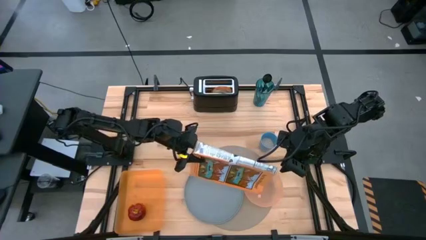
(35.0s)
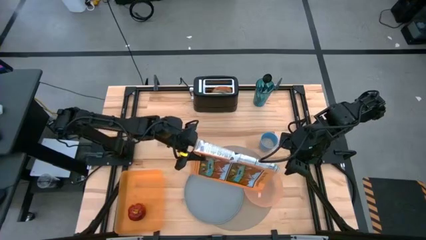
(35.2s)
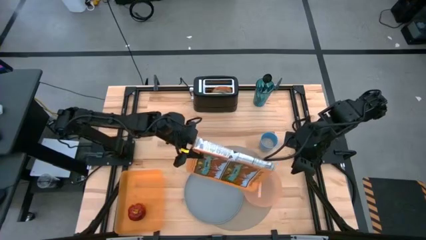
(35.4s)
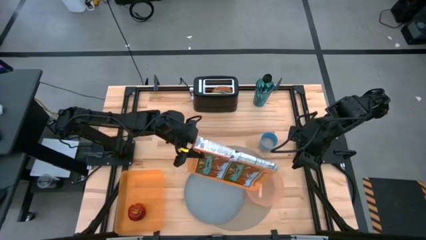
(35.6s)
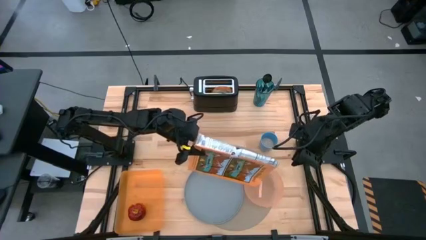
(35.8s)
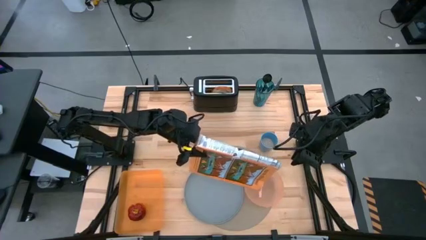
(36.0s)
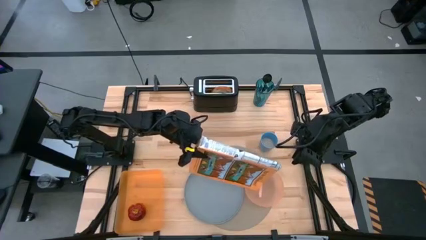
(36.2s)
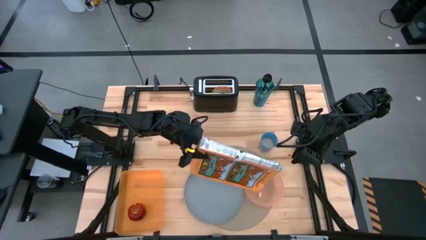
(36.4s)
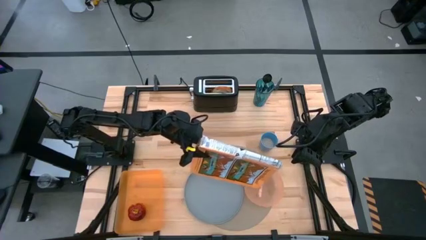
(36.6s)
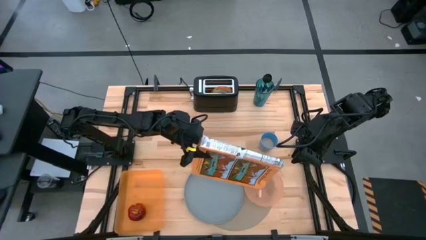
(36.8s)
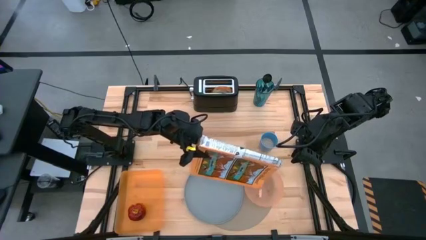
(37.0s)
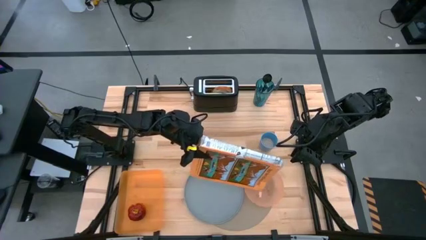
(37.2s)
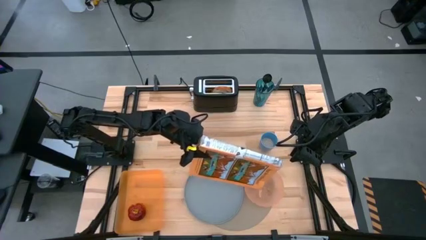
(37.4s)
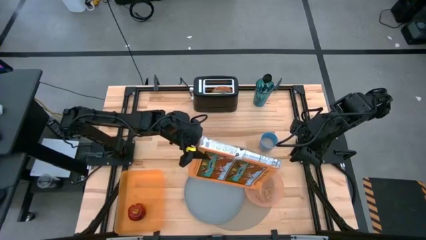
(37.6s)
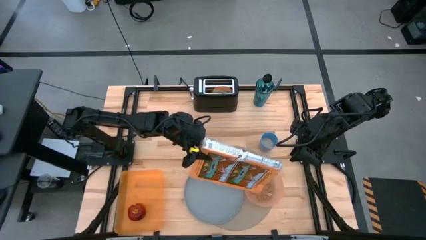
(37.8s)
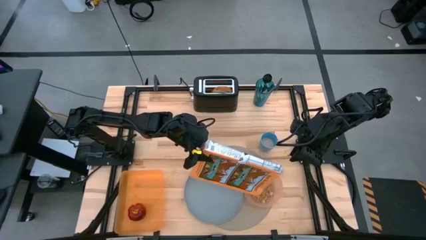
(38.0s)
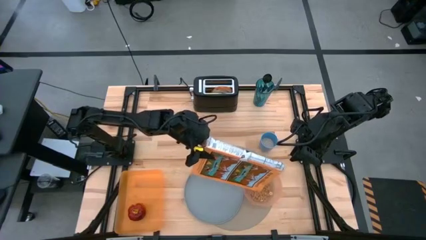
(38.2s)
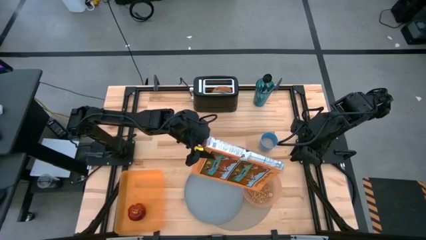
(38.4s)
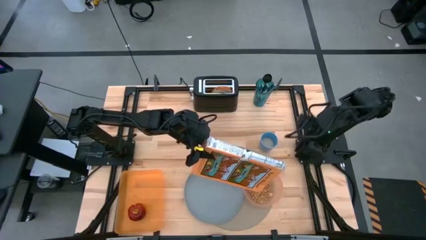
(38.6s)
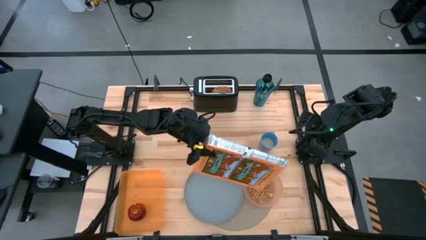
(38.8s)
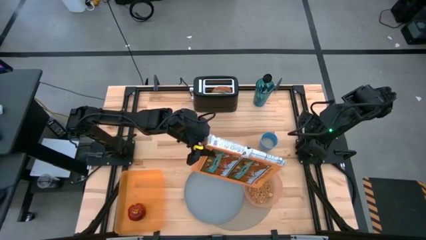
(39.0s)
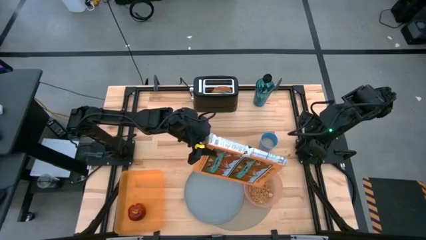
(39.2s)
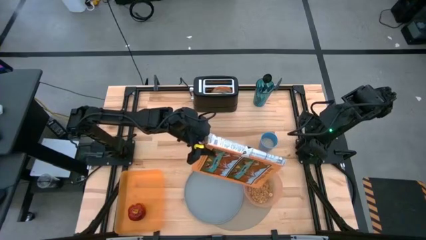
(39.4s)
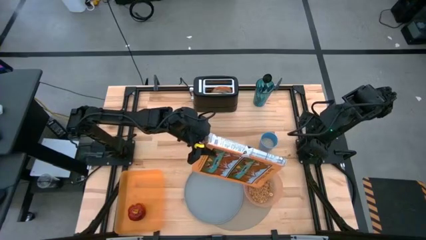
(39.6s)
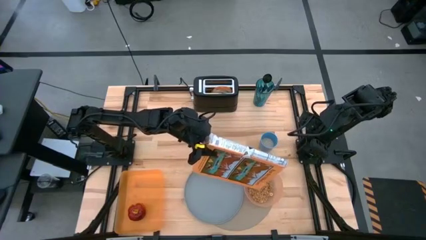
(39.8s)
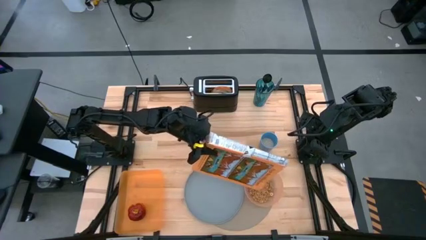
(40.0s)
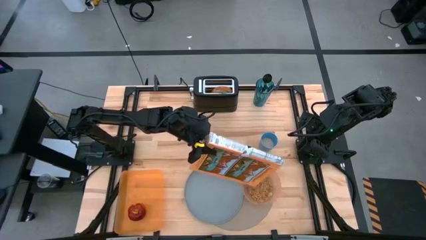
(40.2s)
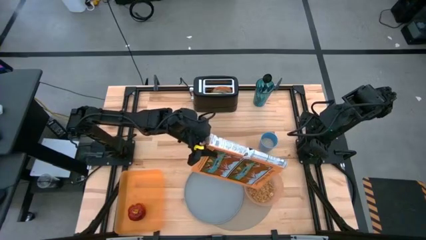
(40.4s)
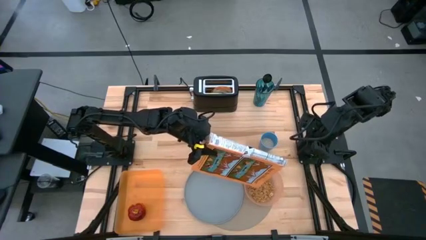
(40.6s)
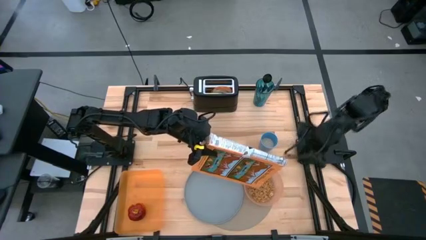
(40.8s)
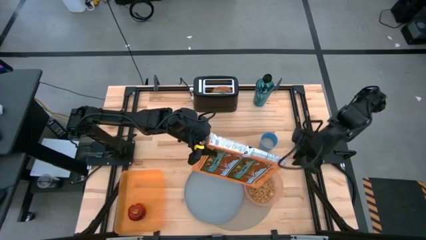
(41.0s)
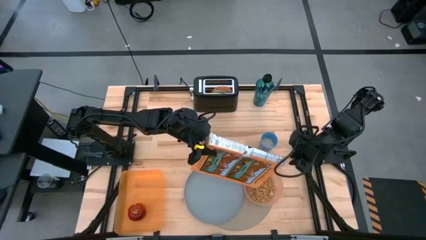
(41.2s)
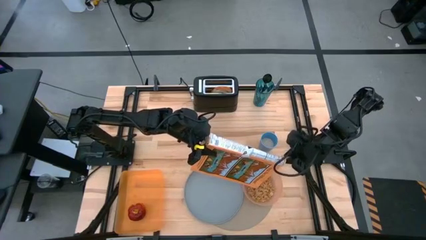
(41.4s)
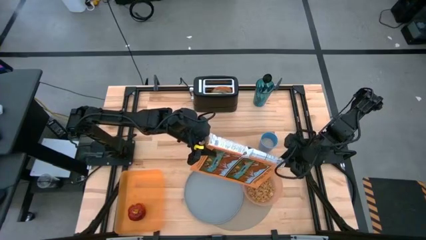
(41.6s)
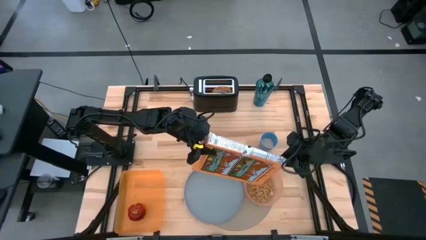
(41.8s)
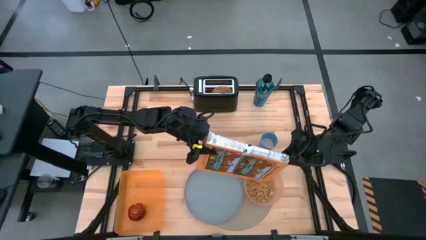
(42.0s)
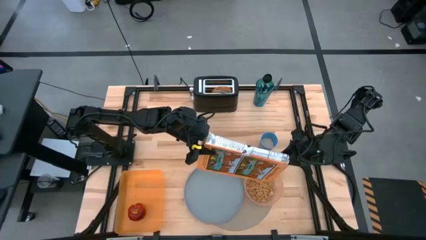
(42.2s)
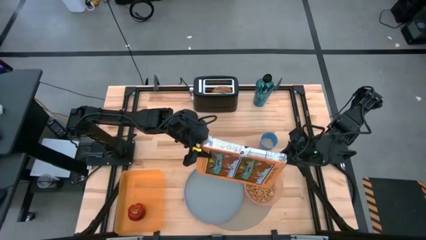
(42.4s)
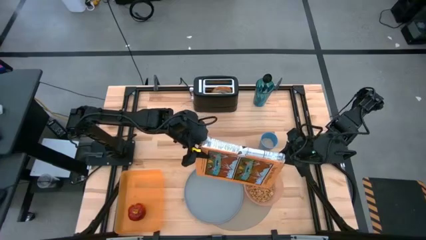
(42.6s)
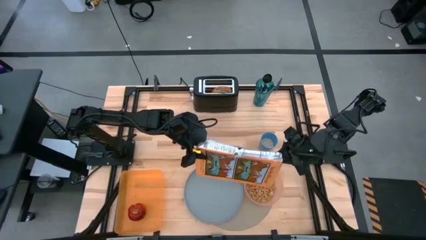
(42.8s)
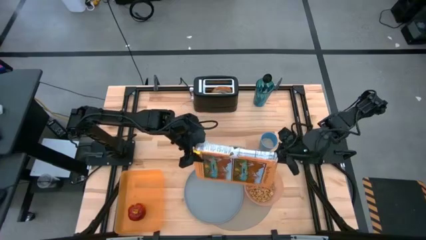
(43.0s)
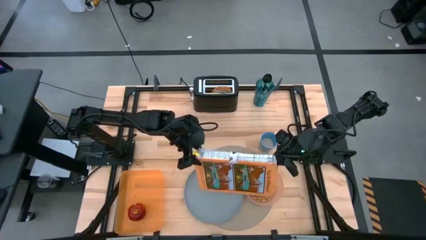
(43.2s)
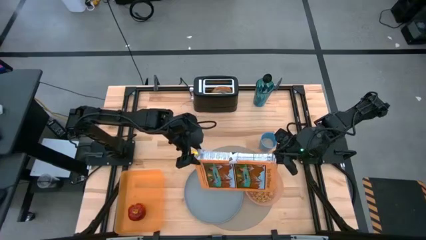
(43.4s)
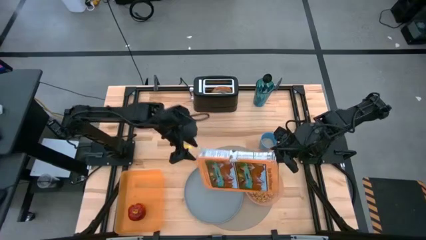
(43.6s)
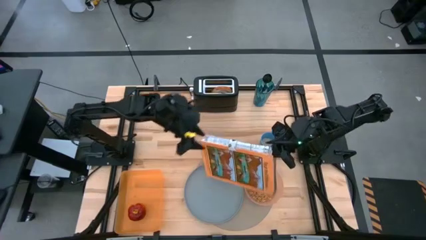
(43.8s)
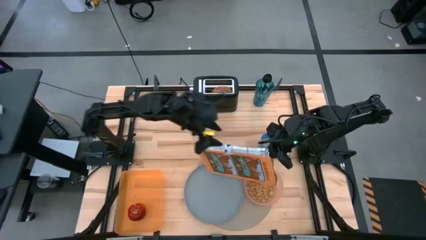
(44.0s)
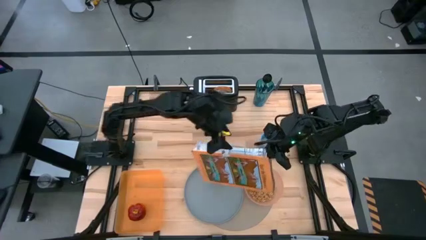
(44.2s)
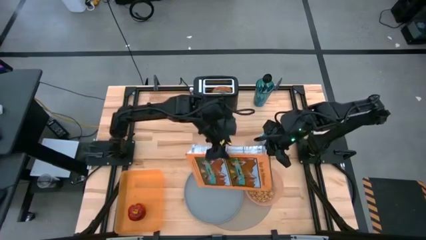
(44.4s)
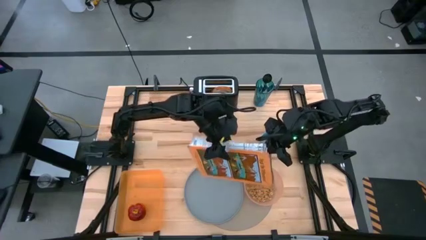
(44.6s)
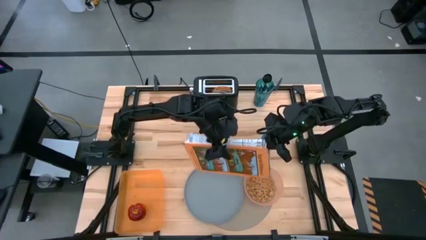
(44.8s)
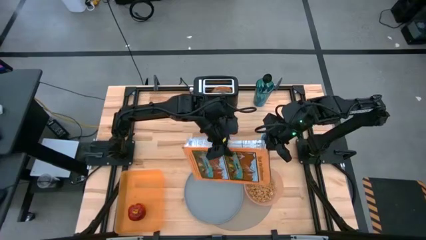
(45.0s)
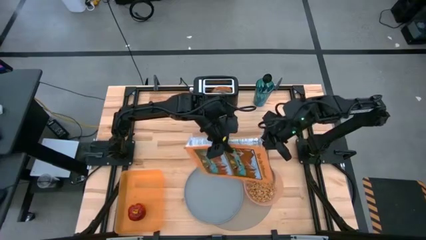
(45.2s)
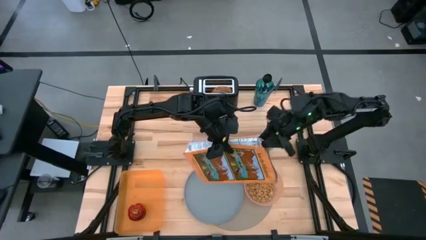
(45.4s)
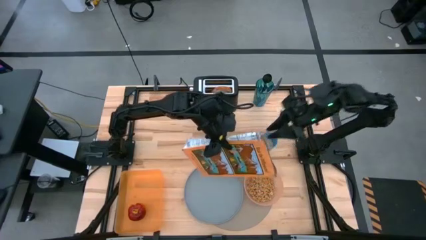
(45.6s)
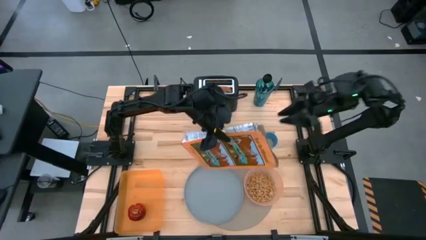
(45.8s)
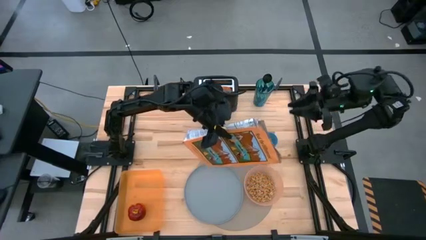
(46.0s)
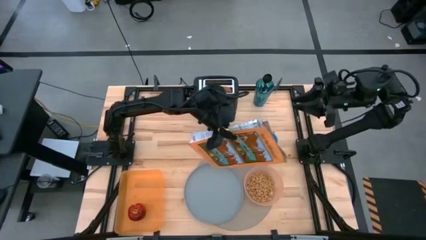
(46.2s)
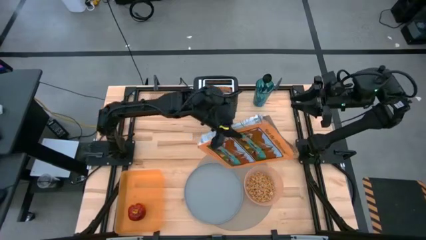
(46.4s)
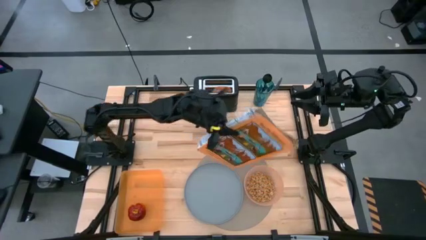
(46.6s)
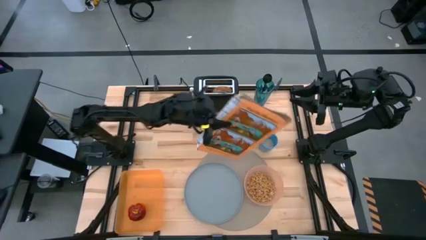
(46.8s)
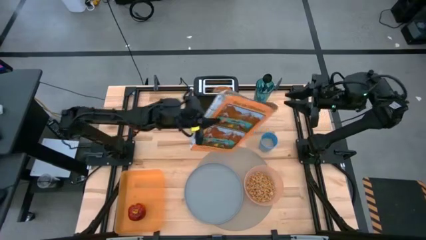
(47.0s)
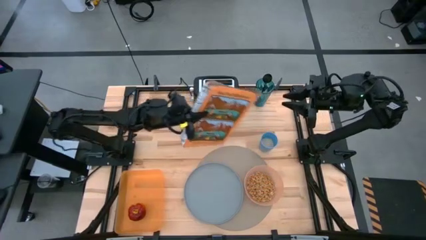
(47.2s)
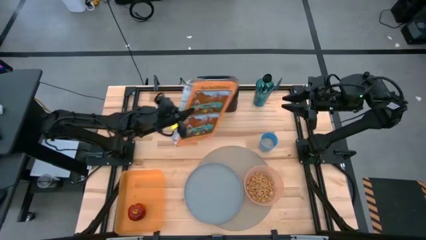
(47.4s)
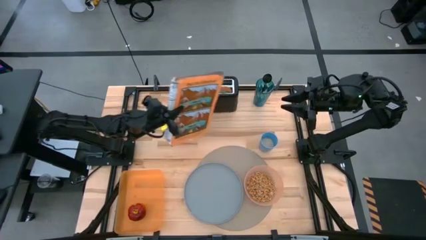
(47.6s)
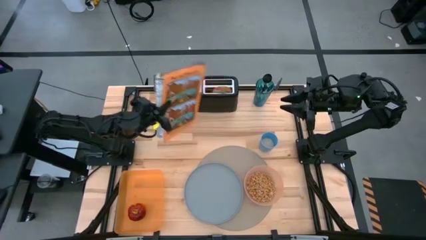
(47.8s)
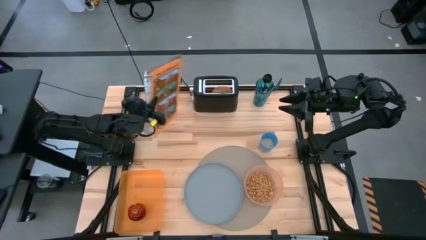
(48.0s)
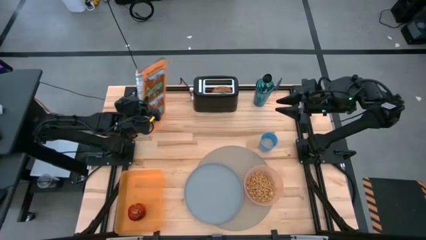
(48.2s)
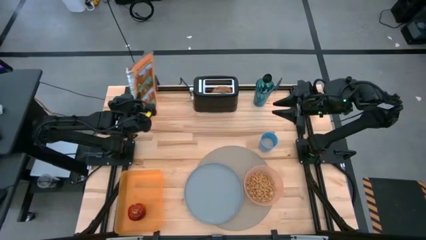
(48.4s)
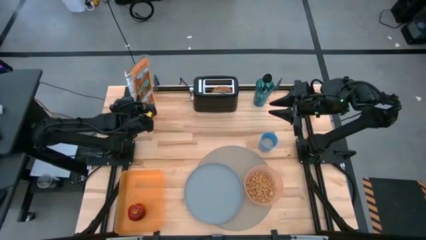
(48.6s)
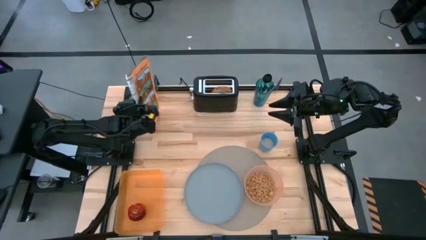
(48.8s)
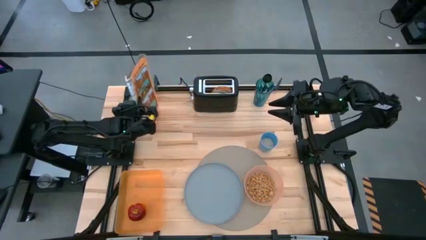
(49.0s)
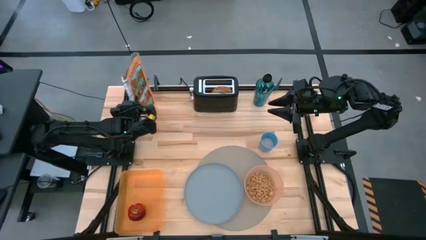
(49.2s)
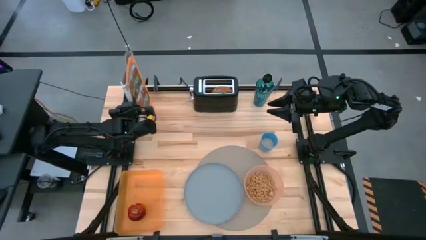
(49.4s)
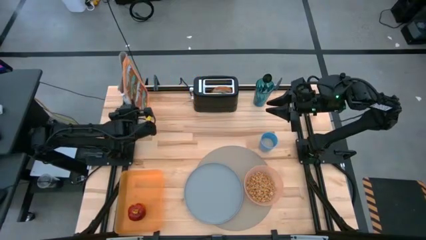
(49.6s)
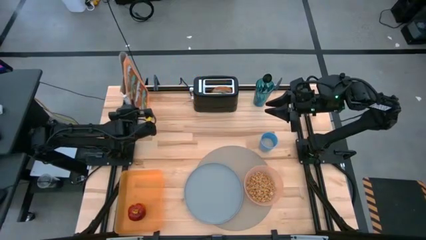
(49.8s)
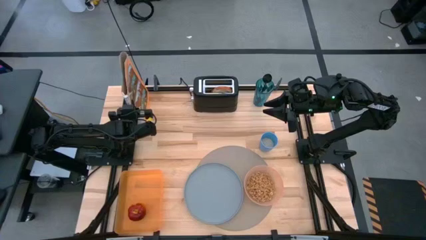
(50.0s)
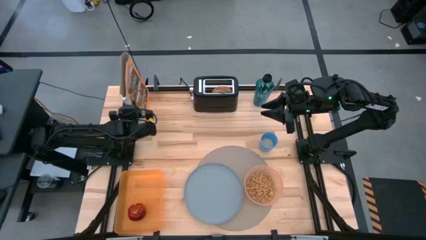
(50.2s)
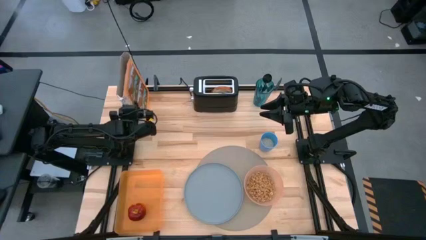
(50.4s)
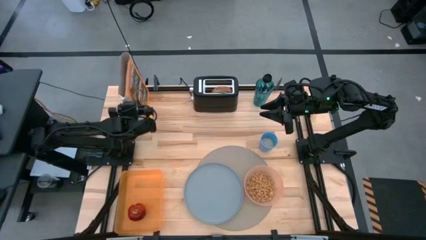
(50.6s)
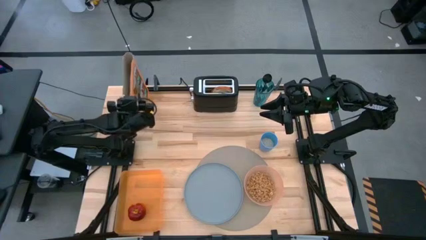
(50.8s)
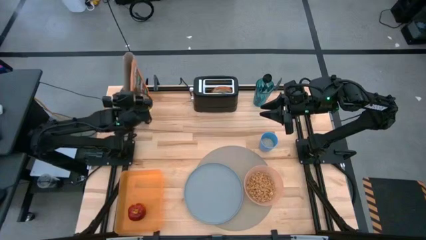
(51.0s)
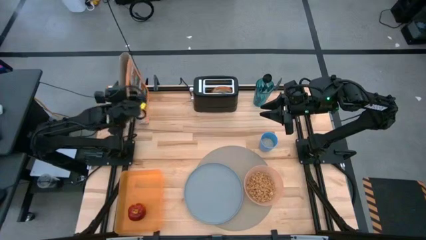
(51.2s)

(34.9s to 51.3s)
Task: Arrange a breakfast setting
Pour the cereal into the light orange bowl on the table mat
